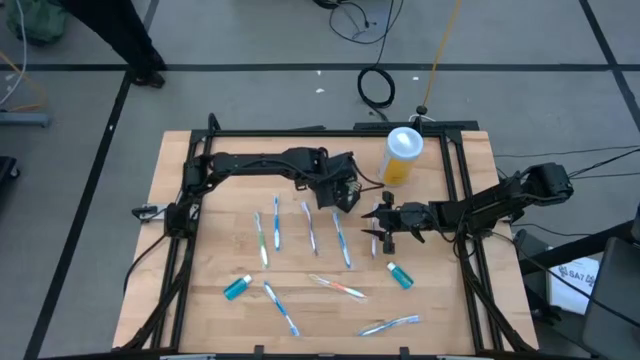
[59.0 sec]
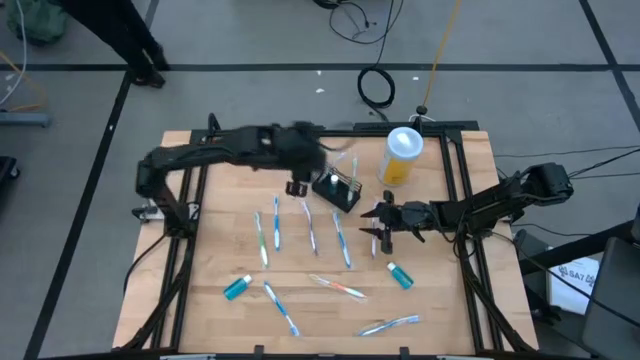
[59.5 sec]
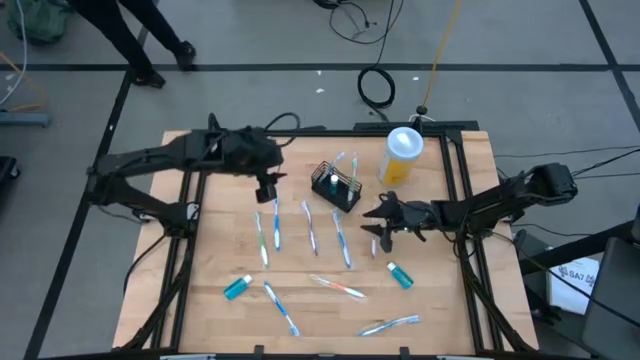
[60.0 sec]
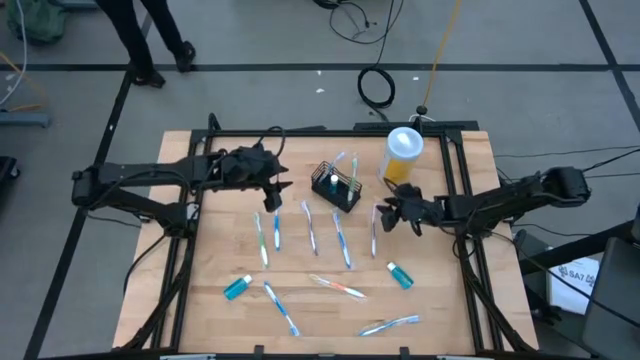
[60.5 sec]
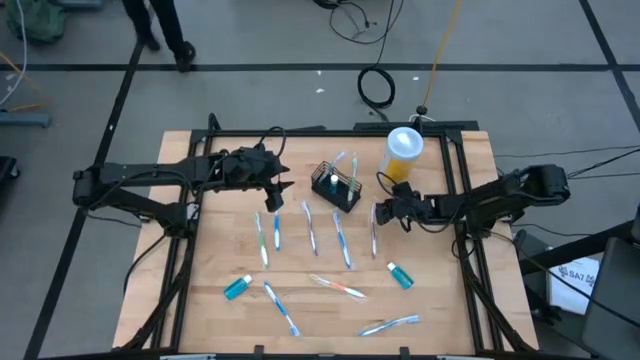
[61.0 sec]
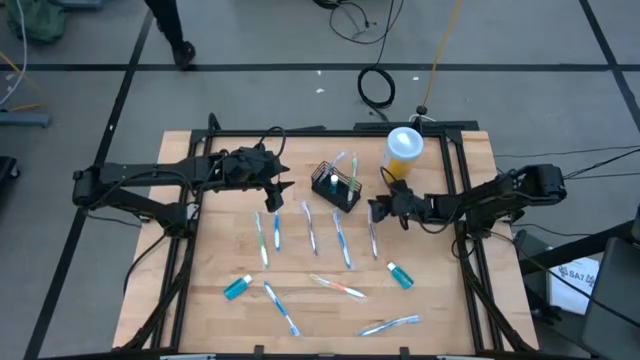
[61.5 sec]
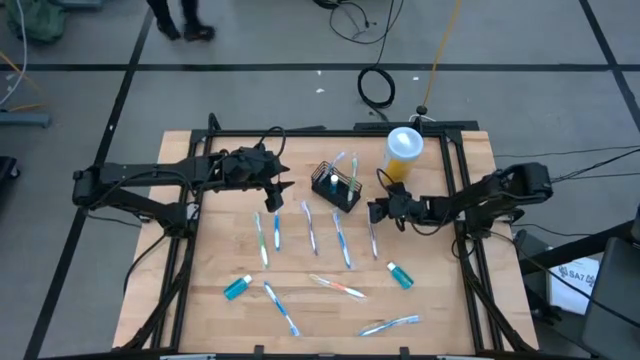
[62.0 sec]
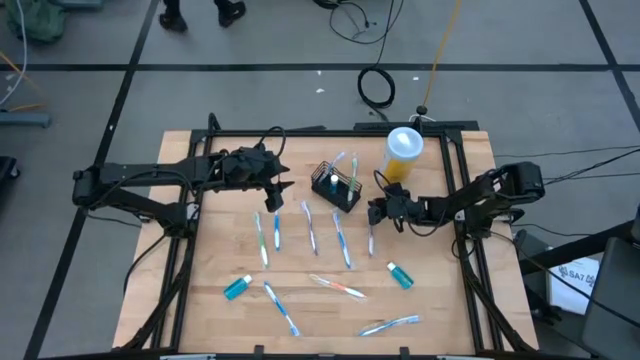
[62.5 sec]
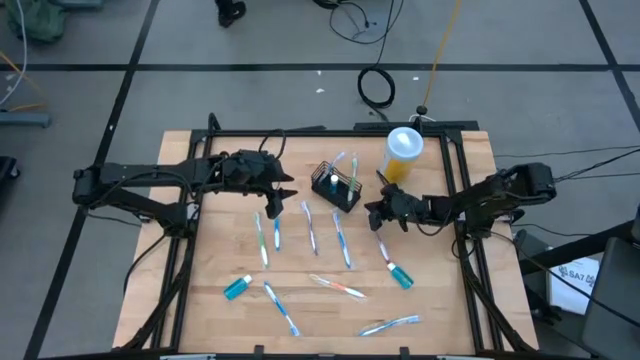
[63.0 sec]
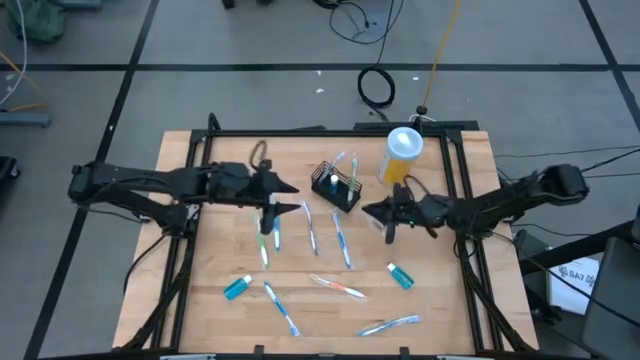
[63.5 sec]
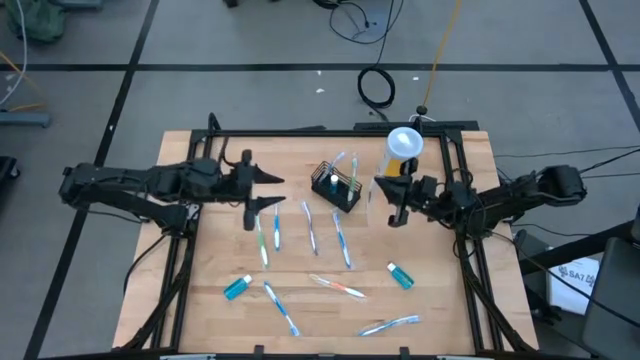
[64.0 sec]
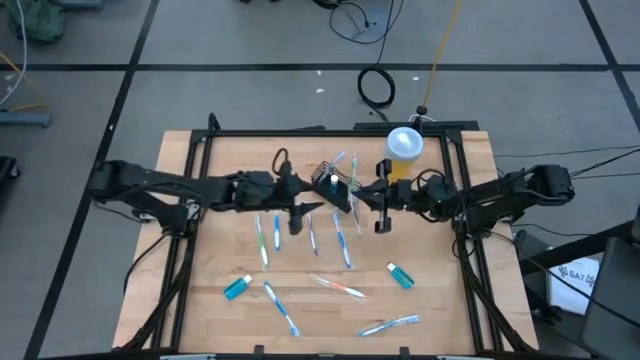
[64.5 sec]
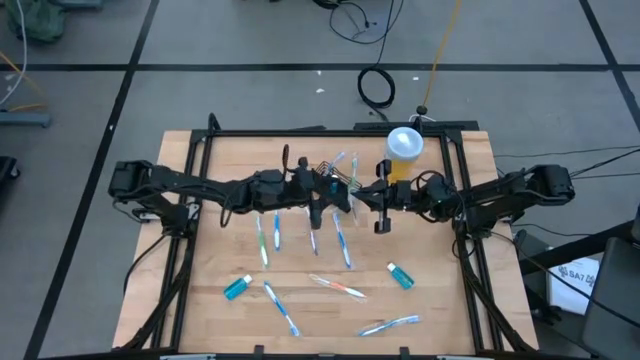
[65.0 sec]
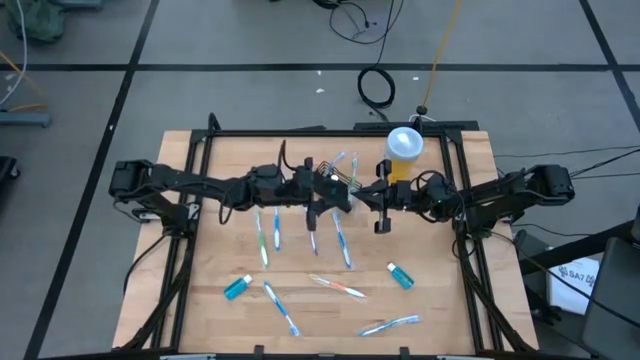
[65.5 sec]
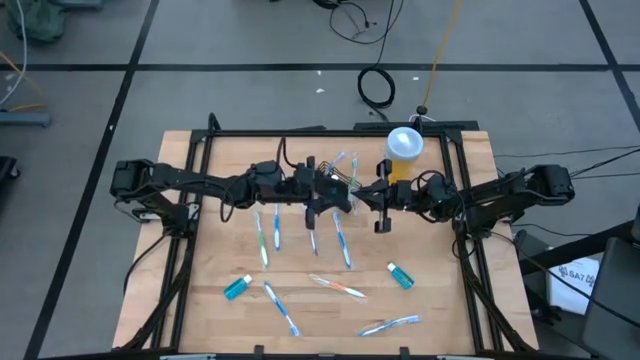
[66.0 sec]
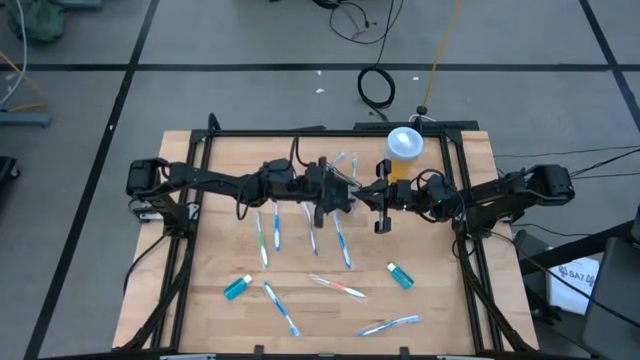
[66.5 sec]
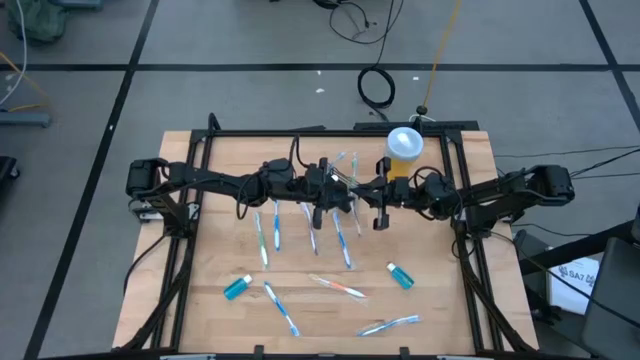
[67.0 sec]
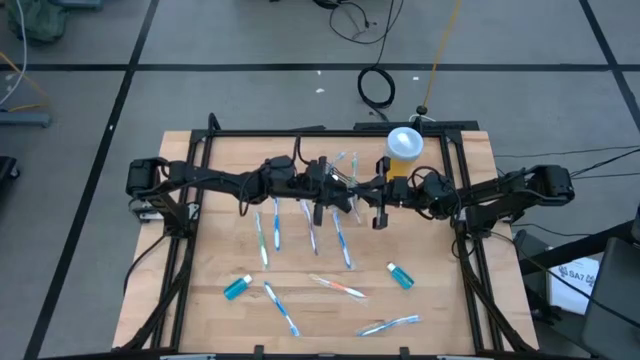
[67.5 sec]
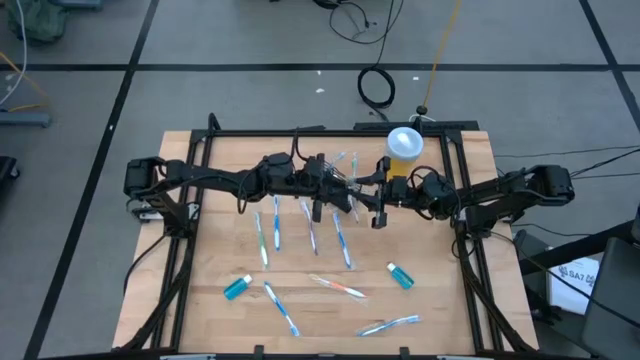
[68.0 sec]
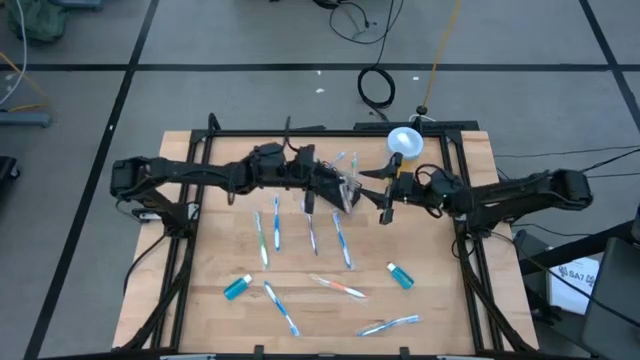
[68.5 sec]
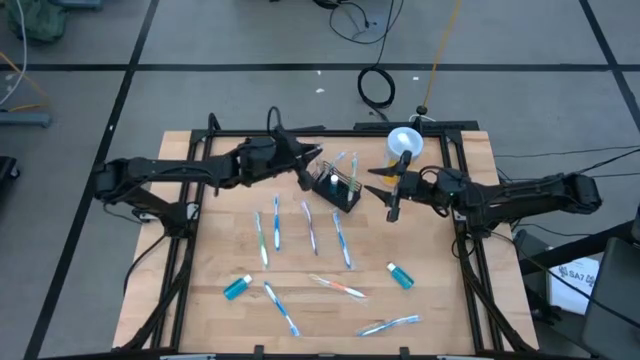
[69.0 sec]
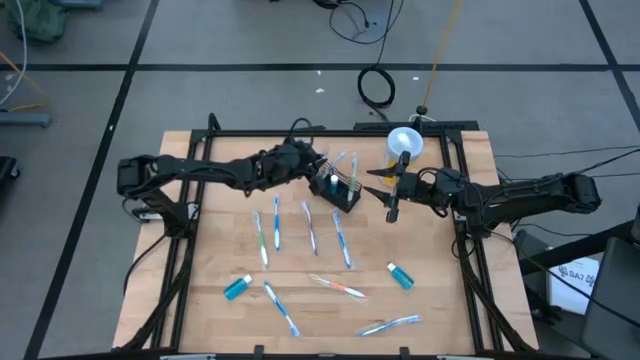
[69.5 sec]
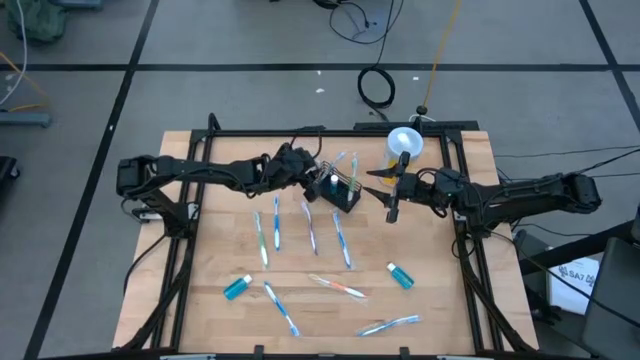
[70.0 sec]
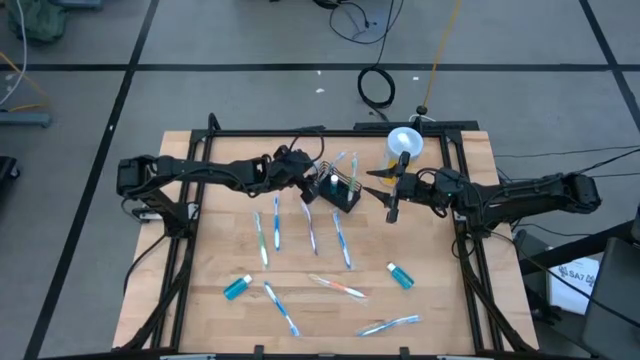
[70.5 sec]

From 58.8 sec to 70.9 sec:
Task: Pick & Place toothbrushing station
Put the purple toothbrush into the black organizer

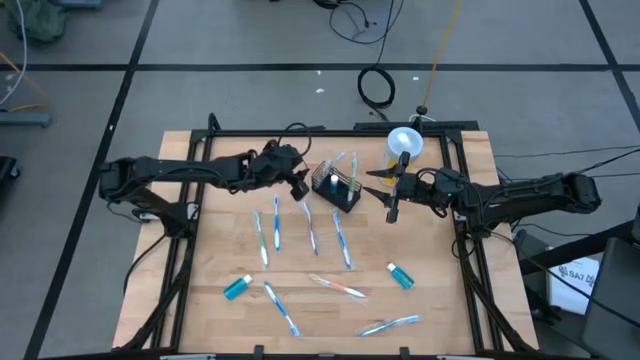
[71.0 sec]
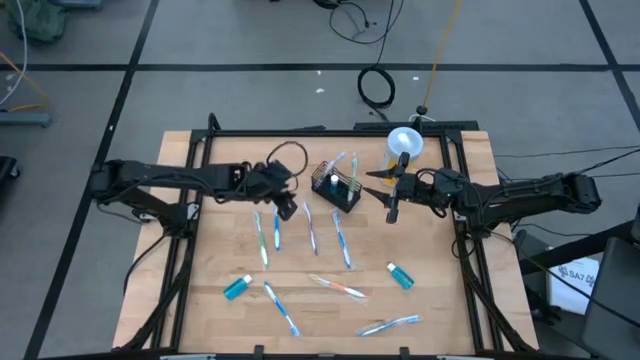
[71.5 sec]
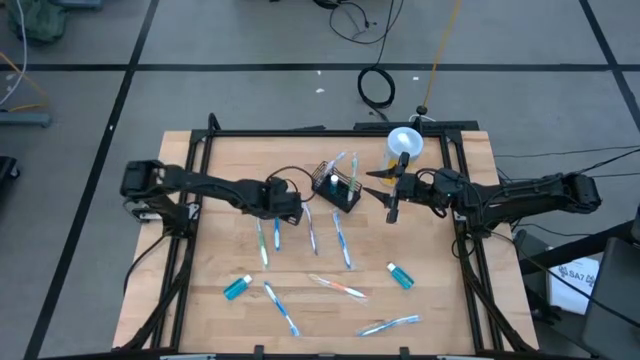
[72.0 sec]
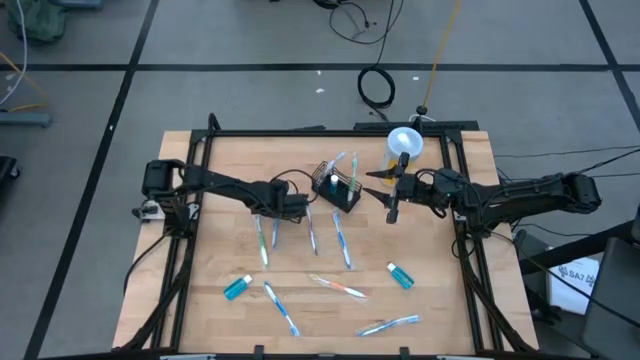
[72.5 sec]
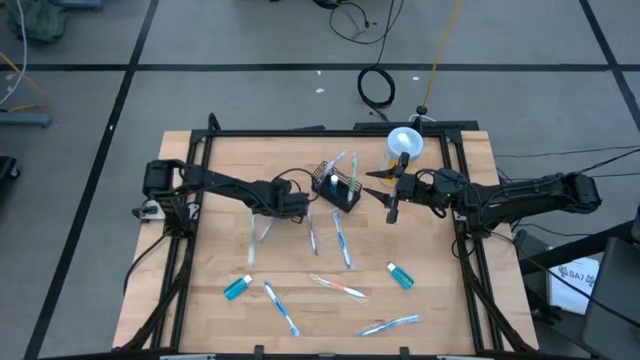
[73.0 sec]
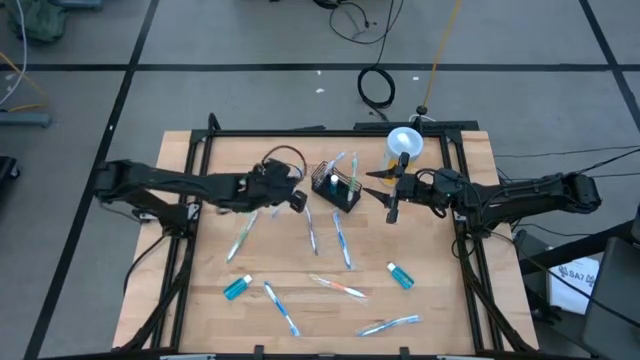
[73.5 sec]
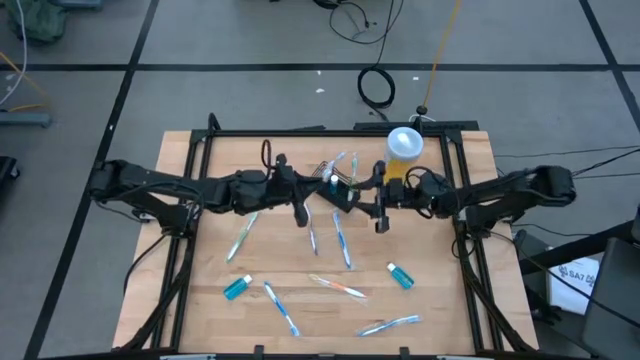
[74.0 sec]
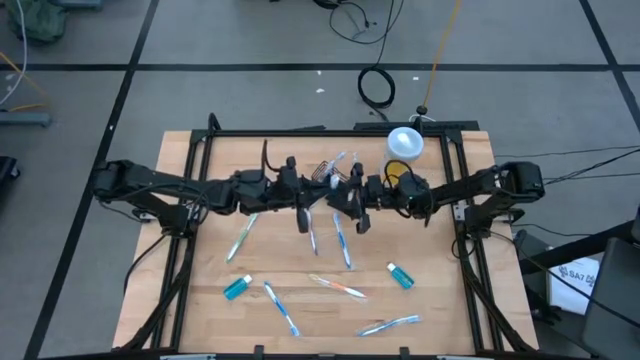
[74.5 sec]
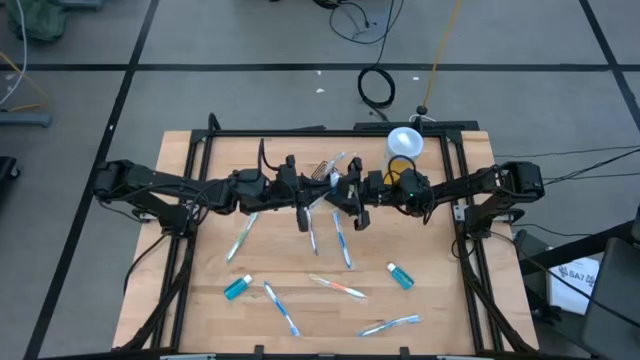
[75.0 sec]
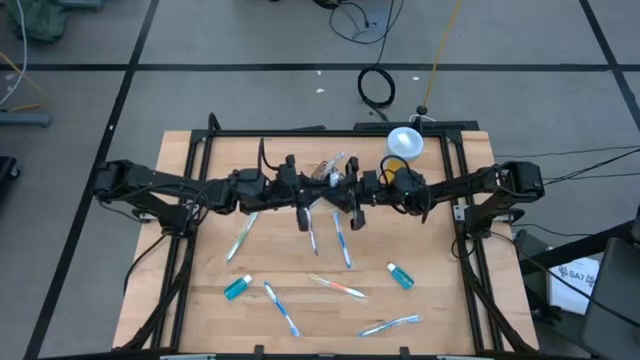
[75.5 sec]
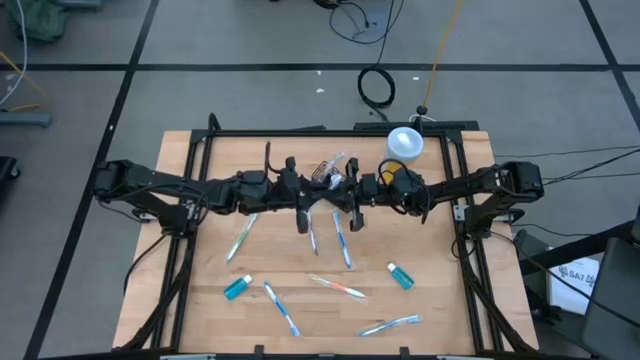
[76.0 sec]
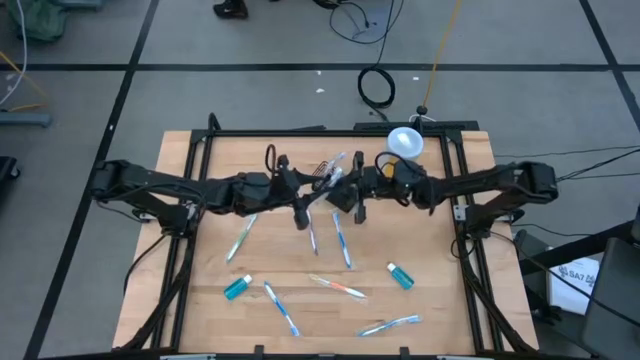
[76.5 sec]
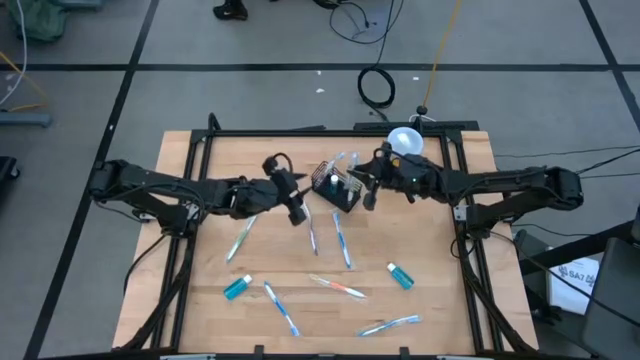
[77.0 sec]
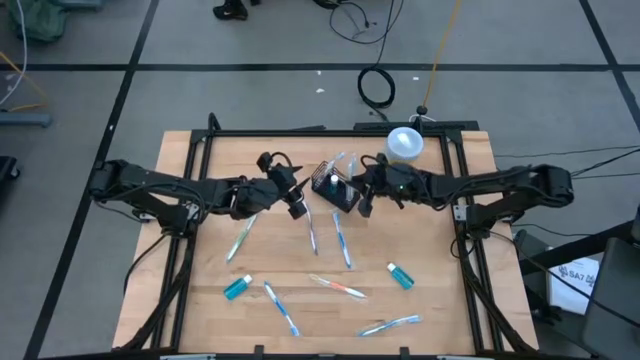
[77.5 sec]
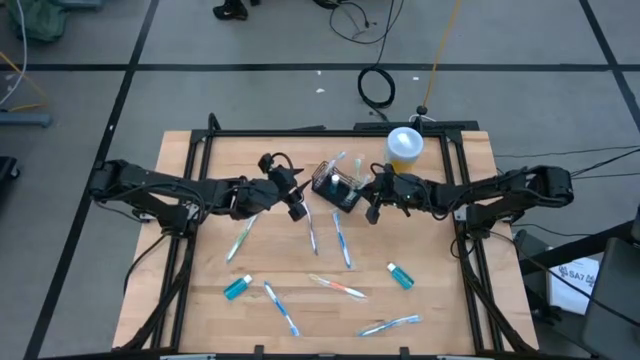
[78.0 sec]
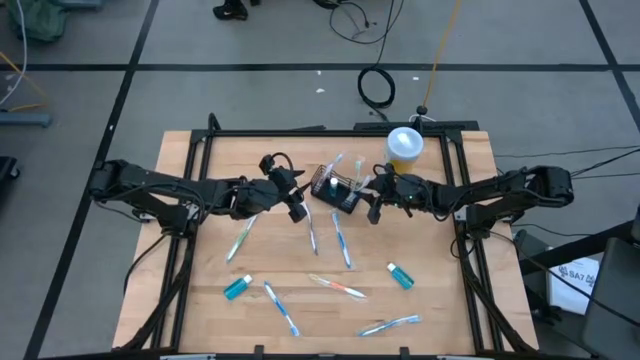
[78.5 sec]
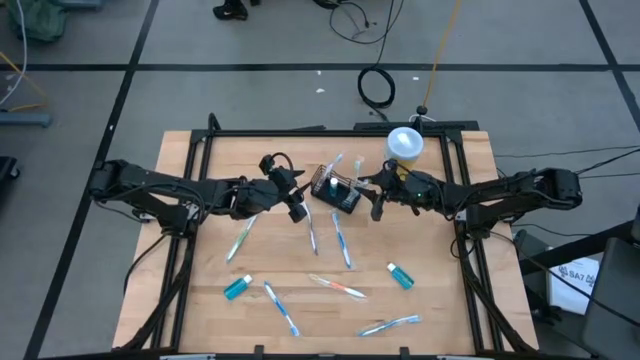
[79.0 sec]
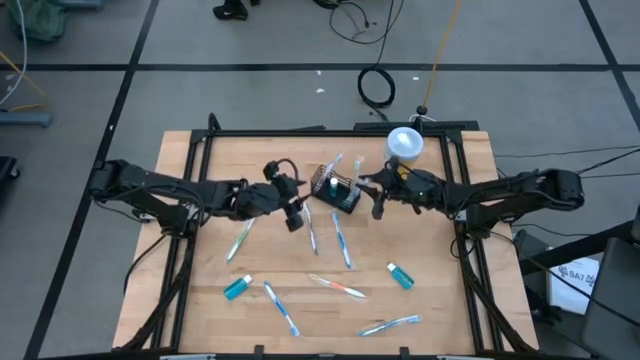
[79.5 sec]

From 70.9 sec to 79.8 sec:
Put the blue toothbrush into the black organizer

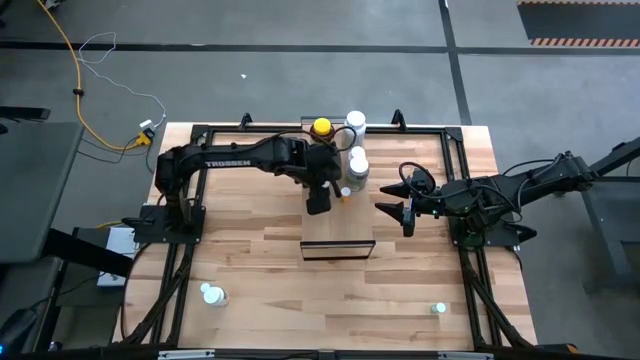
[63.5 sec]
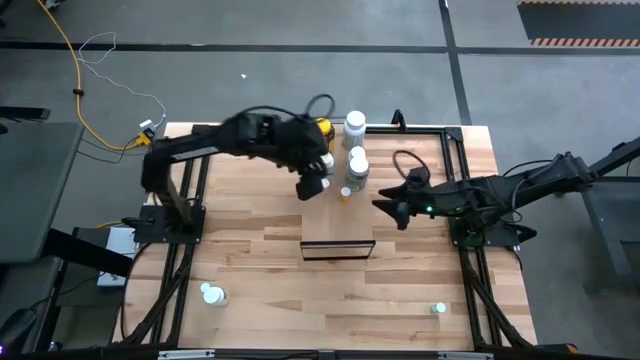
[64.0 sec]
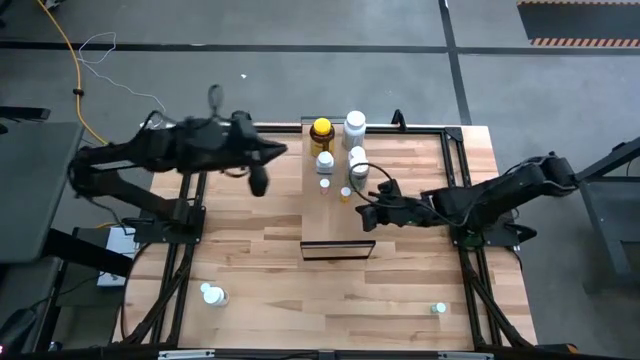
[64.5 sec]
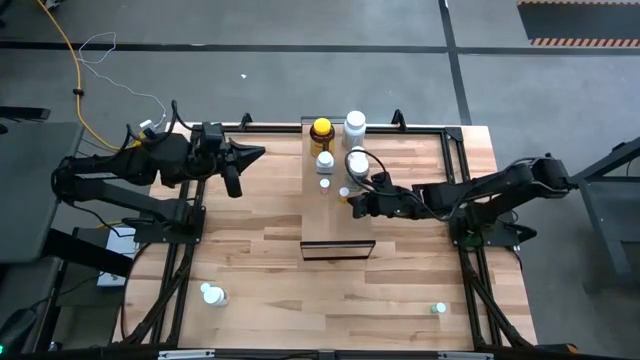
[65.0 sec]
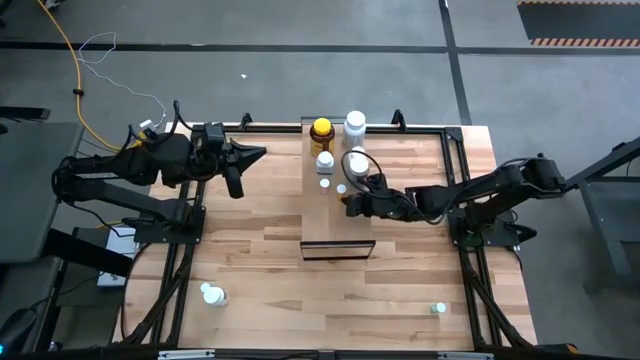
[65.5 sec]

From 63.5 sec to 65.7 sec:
Task: Pick and place medicine bottles onto shelf by color
Adjust the orange pill bottle on the shelf
